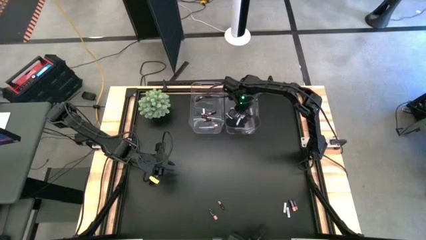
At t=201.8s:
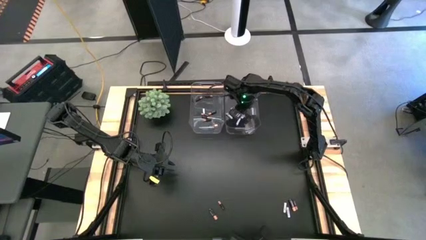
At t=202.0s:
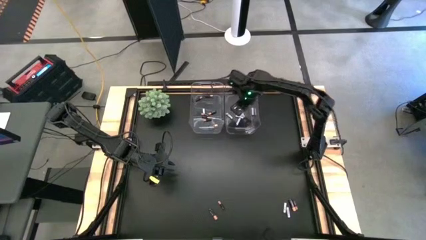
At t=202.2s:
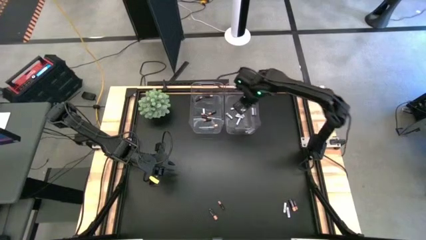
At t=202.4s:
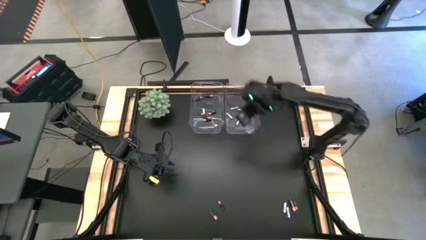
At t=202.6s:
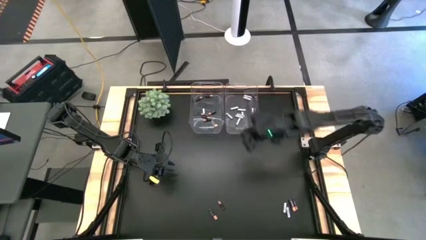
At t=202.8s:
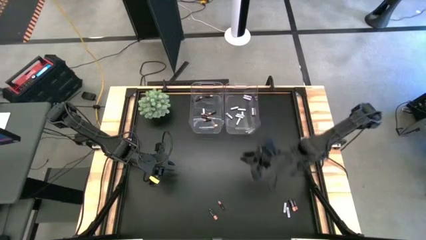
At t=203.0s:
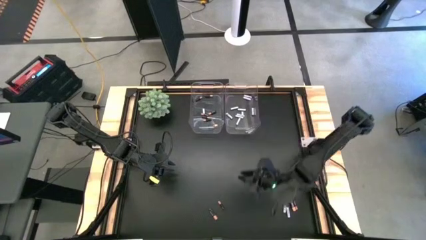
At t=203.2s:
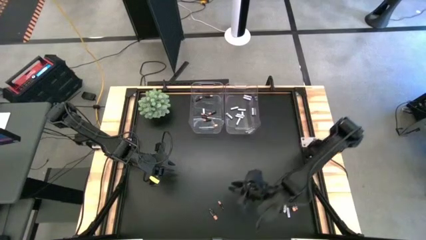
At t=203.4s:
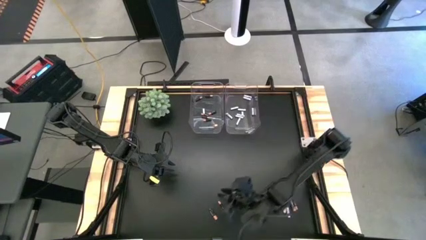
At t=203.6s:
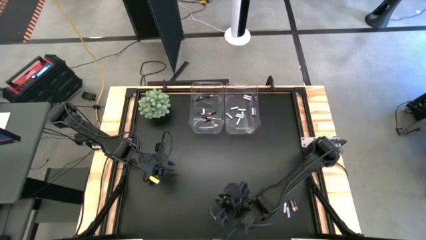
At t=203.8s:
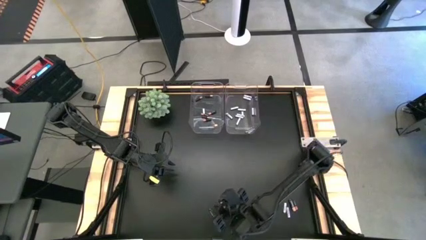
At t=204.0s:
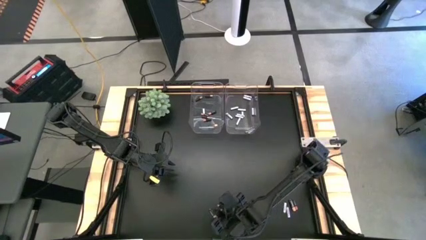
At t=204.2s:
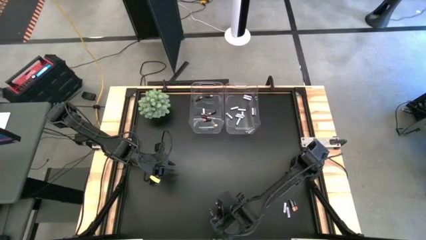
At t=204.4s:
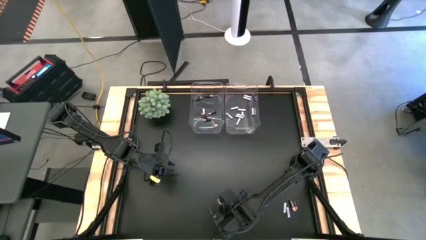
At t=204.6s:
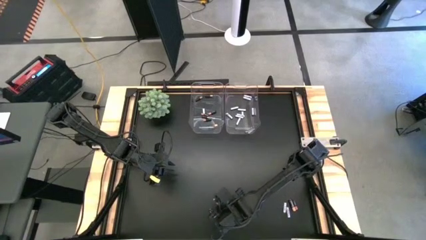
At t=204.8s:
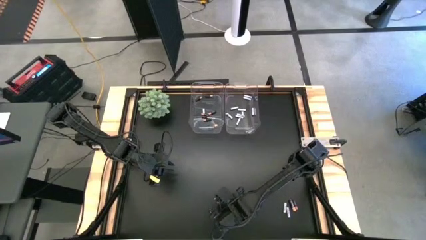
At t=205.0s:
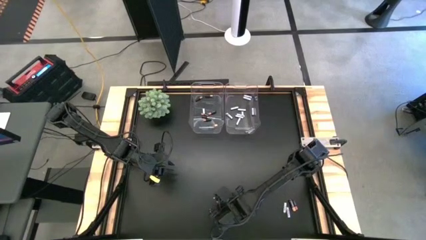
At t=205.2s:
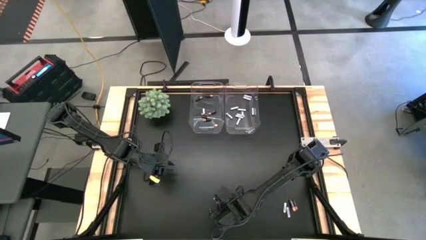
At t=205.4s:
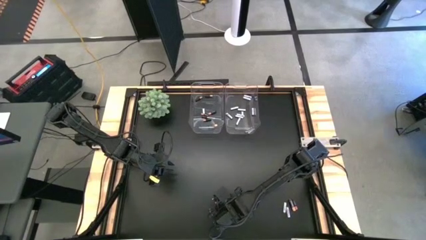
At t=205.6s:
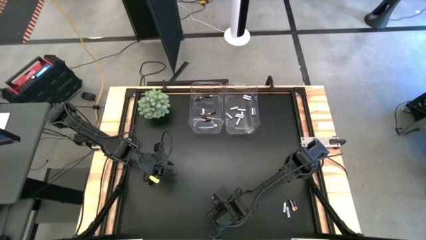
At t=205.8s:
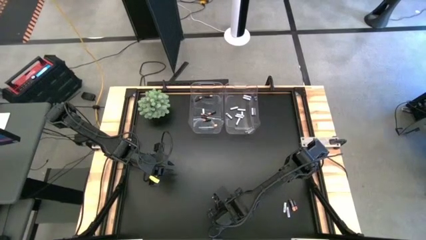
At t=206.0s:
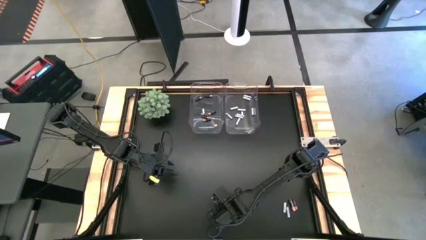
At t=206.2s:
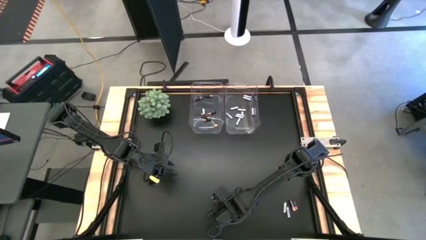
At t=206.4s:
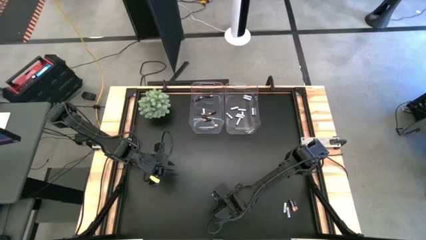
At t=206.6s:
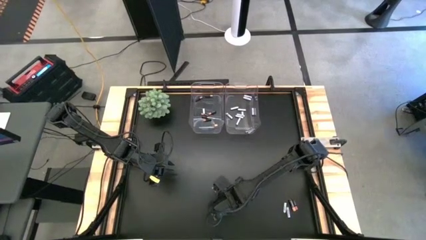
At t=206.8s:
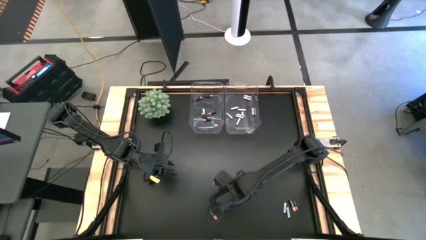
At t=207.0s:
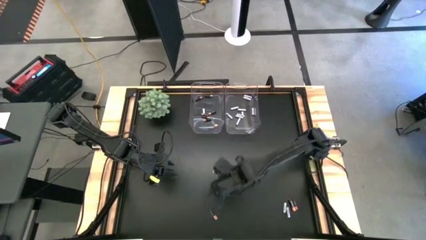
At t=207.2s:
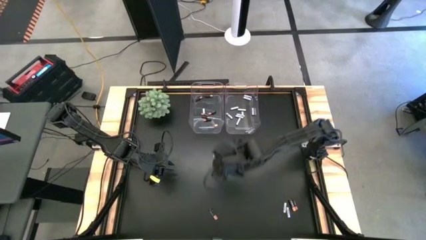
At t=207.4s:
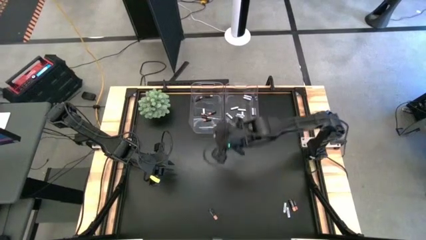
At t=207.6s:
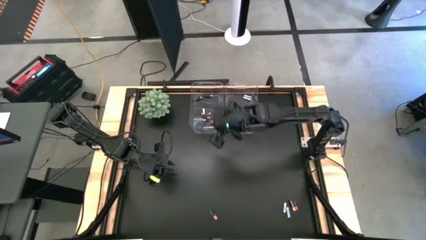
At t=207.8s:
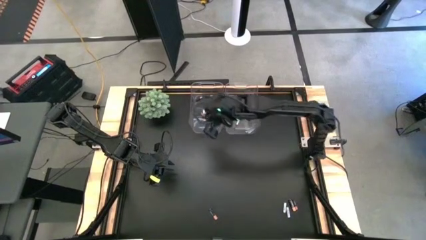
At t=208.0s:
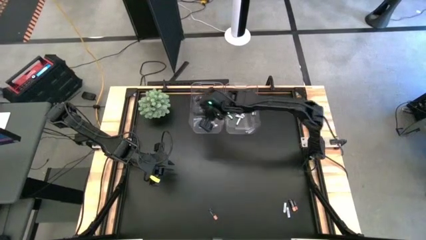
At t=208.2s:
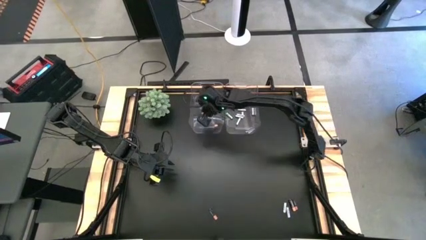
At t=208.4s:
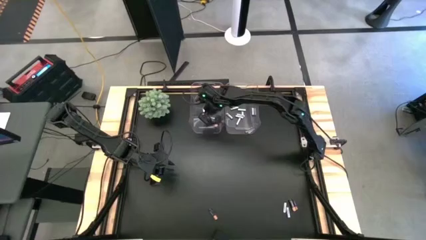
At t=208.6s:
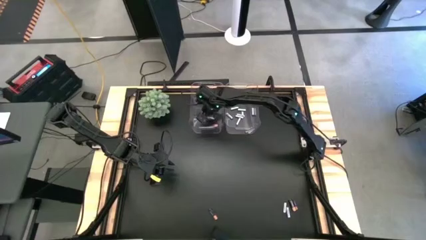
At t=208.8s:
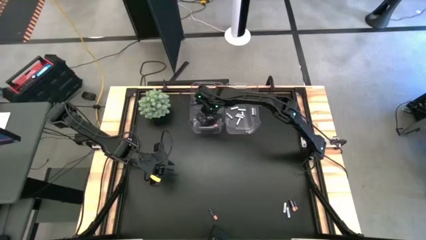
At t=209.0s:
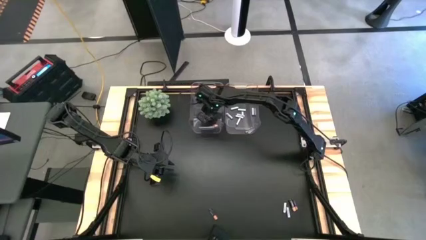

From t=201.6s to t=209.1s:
Task: Sort batteries
Put the small black battery into the left transparent bin

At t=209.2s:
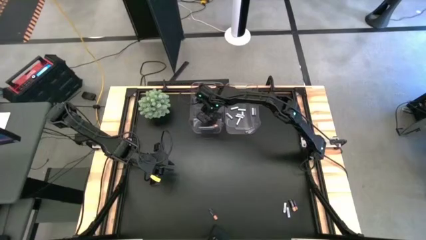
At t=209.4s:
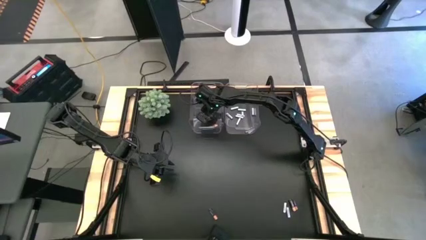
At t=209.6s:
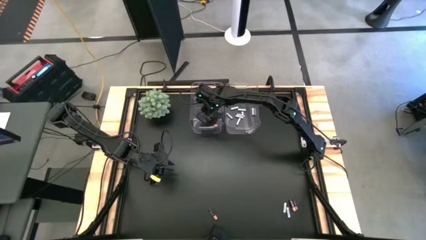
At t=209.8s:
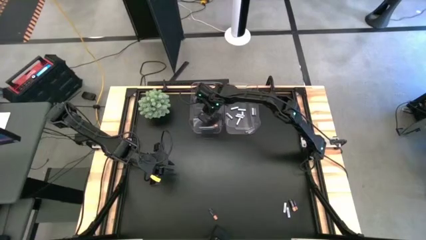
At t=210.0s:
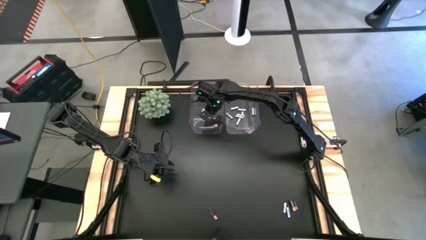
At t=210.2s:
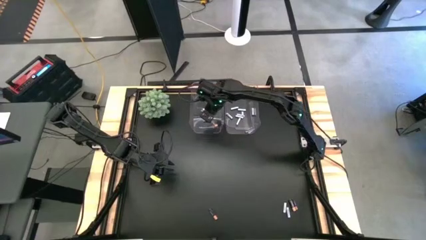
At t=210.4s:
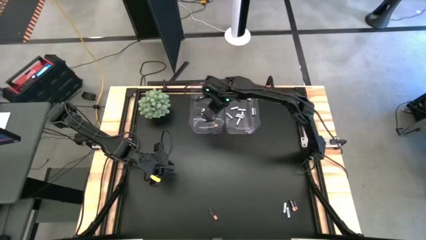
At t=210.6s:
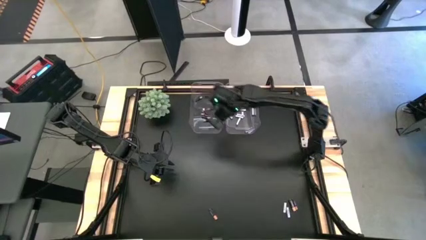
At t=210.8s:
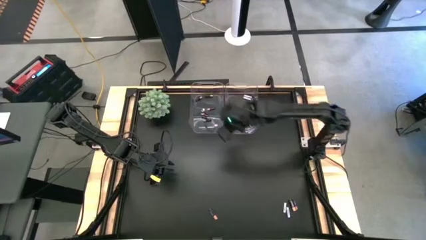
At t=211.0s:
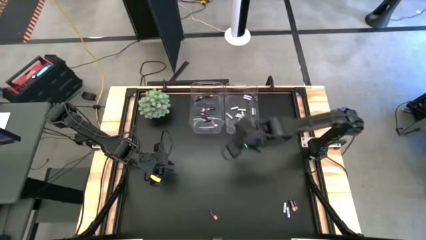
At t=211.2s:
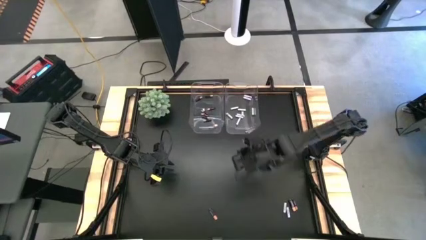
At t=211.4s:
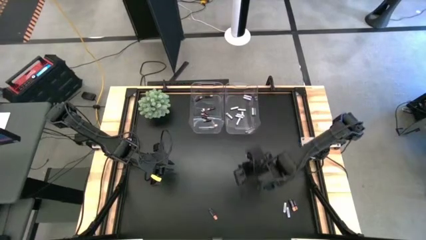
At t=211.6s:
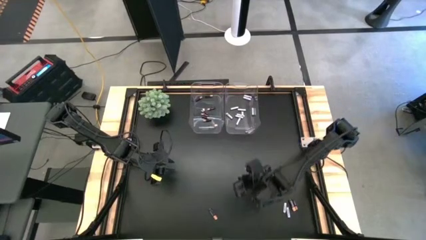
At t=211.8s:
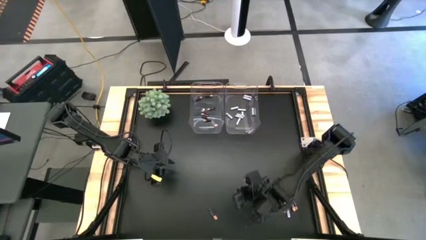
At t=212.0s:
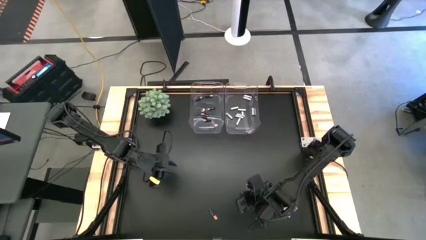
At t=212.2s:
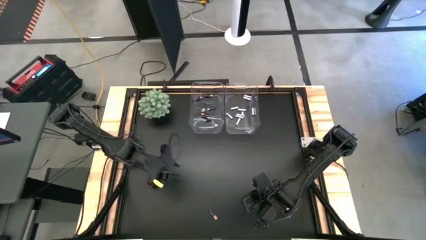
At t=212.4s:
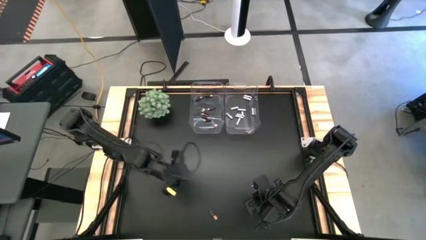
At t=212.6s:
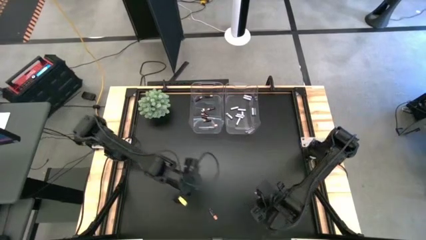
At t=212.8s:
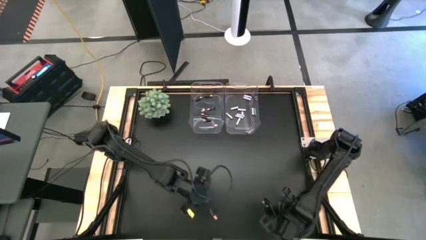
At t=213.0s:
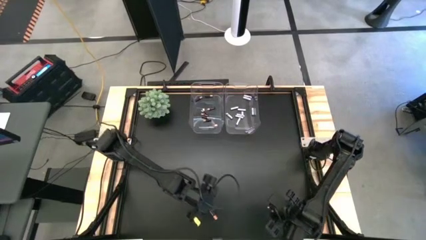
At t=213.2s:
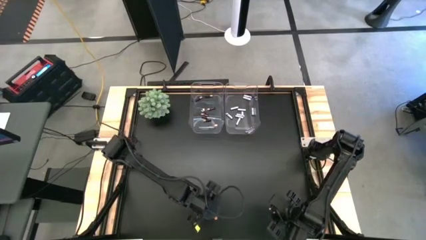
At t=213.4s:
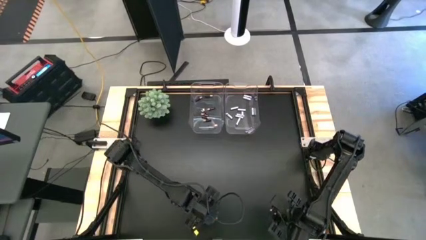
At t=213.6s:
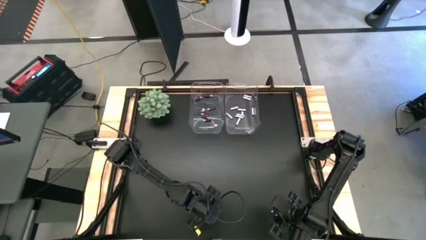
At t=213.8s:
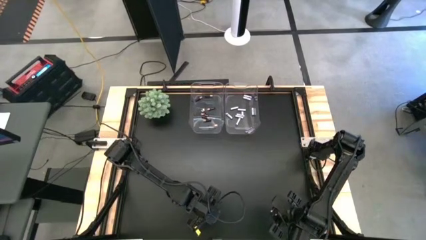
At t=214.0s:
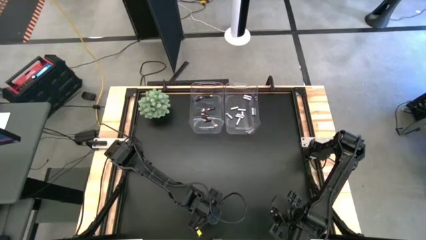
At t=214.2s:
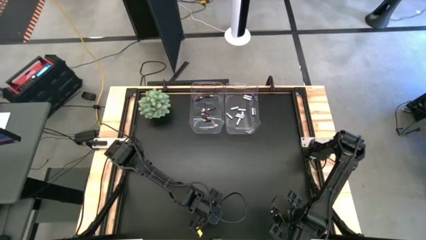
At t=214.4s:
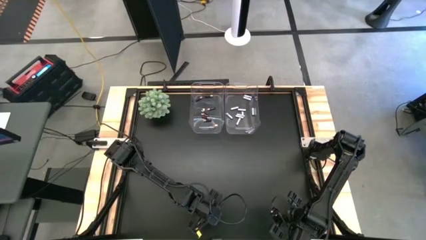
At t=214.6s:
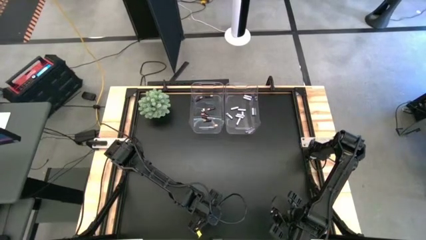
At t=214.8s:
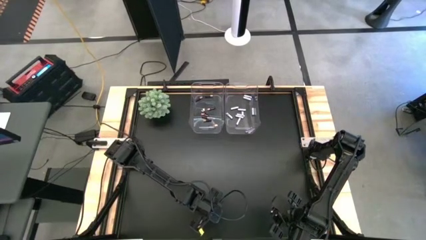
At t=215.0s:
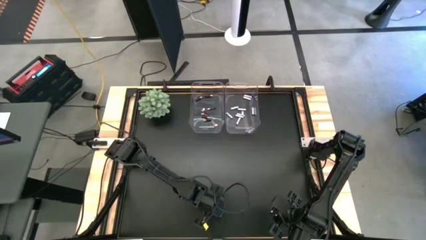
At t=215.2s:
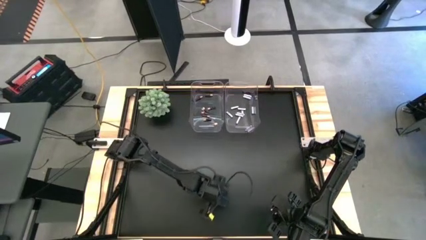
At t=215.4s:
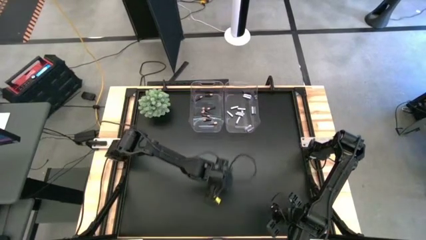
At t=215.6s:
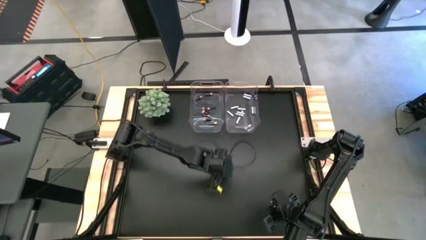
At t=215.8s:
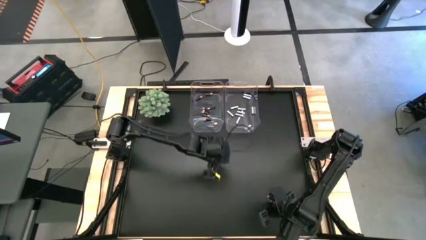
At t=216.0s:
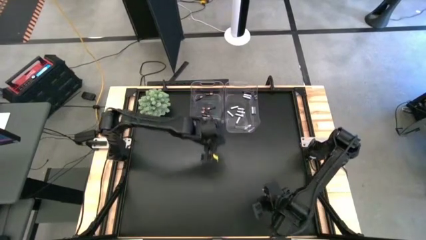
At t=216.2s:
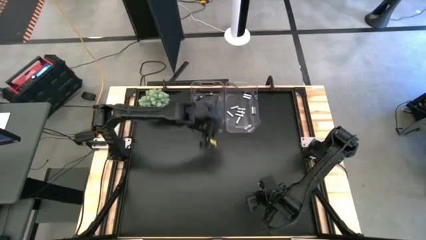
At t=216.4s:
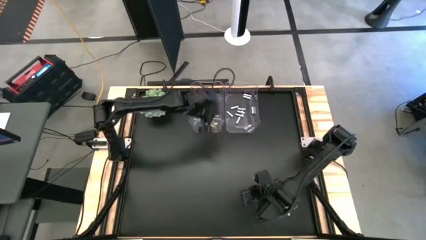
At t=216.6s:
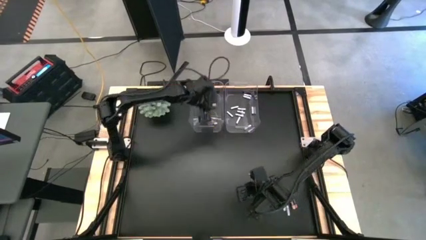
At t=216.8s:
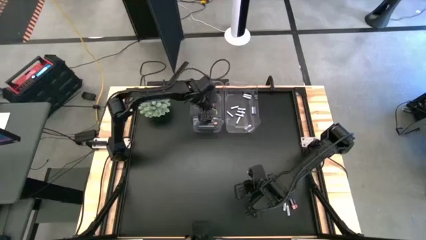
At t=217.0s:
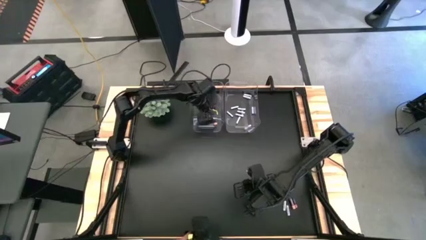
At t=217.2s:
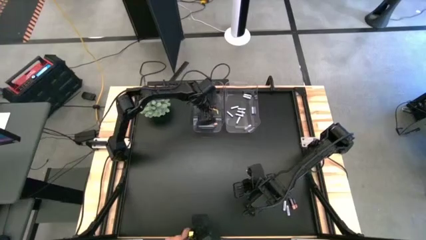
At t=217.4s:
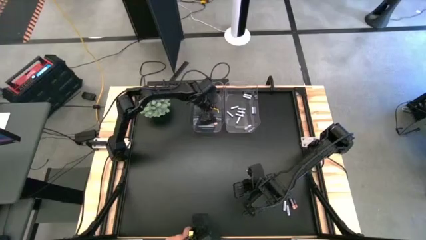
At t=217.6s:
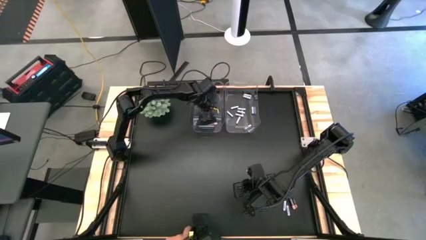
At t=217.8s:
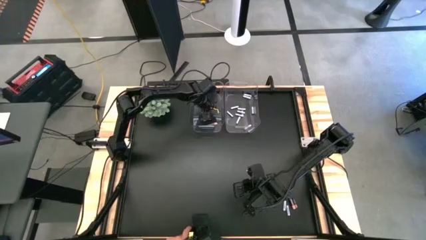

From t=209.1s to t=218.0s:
Put the large black battery into the left transparent bin
